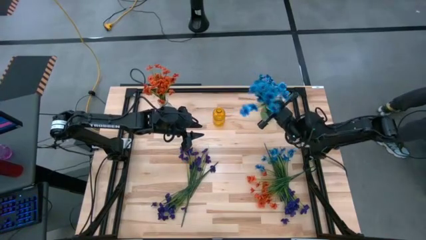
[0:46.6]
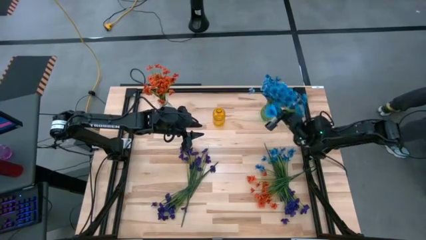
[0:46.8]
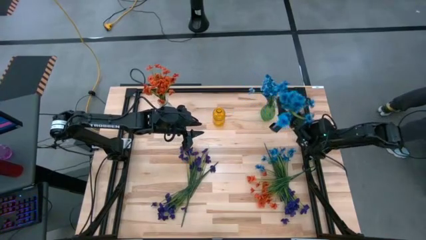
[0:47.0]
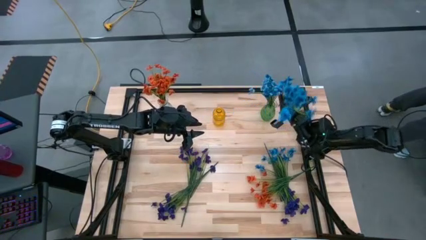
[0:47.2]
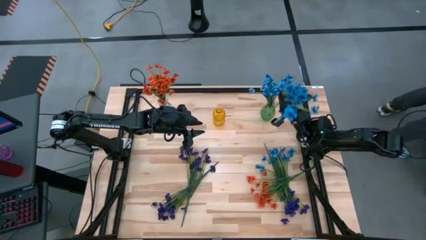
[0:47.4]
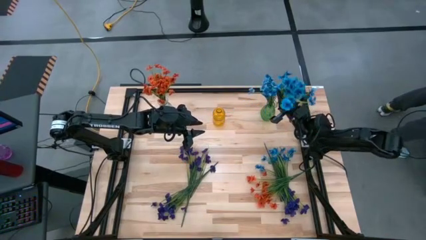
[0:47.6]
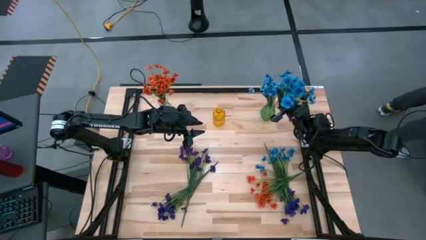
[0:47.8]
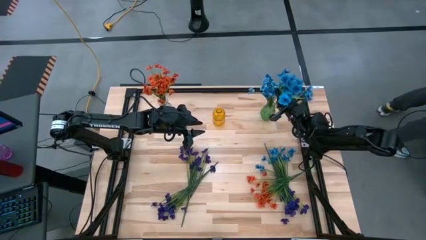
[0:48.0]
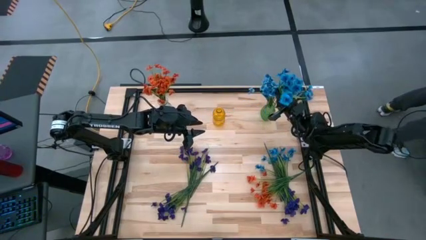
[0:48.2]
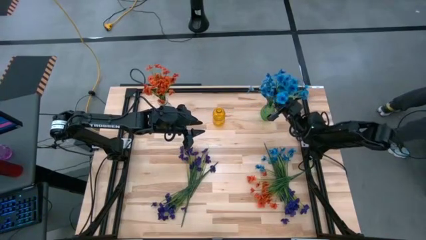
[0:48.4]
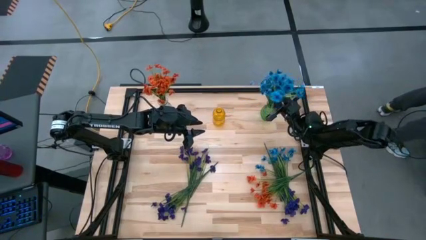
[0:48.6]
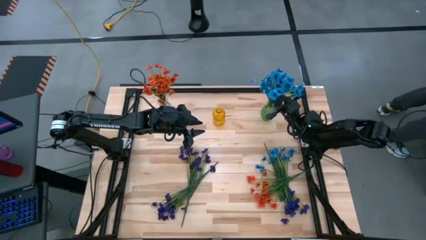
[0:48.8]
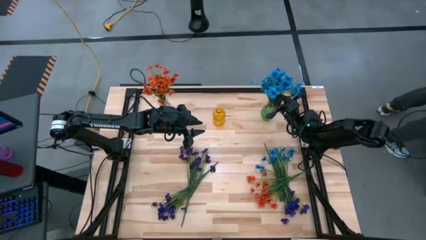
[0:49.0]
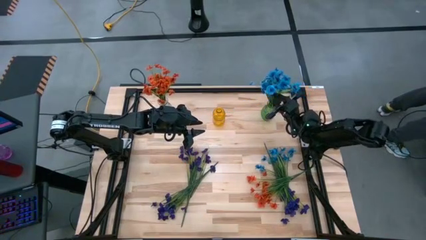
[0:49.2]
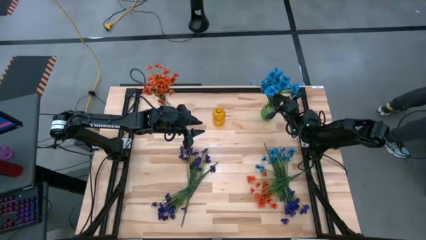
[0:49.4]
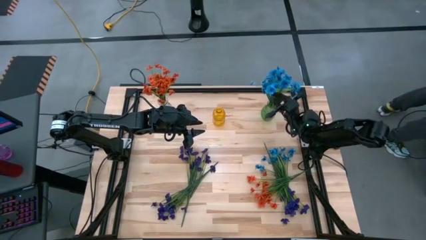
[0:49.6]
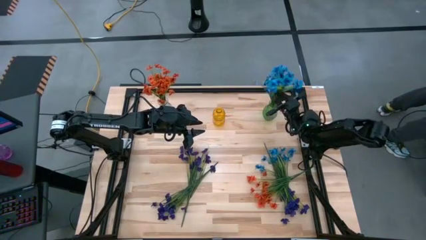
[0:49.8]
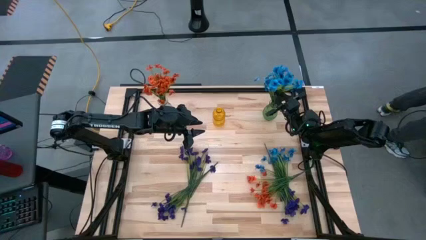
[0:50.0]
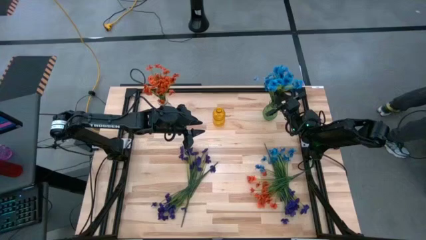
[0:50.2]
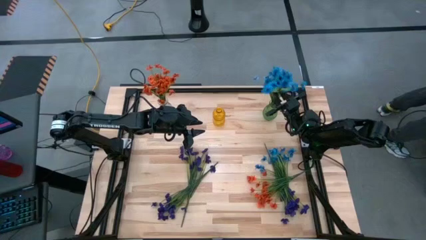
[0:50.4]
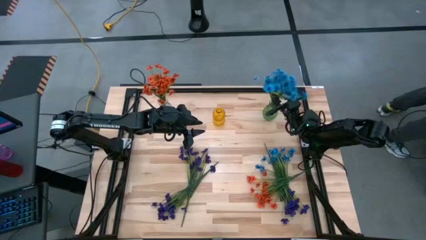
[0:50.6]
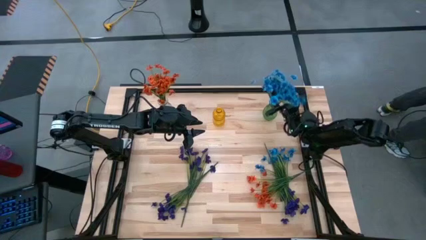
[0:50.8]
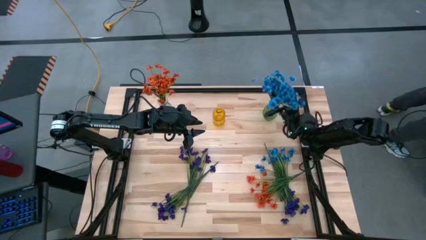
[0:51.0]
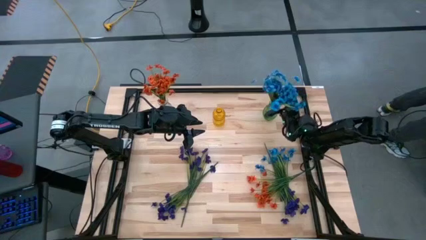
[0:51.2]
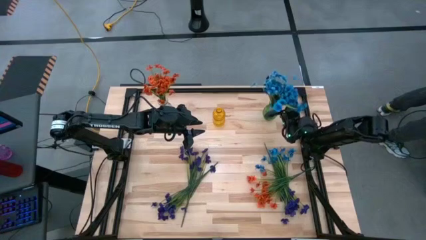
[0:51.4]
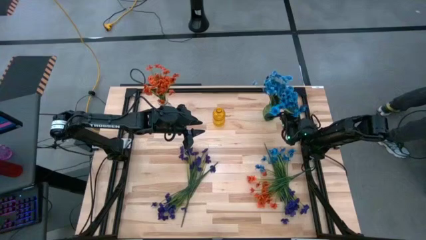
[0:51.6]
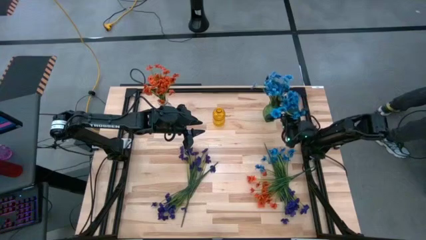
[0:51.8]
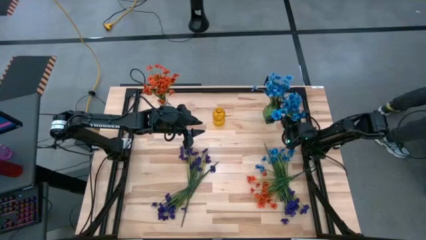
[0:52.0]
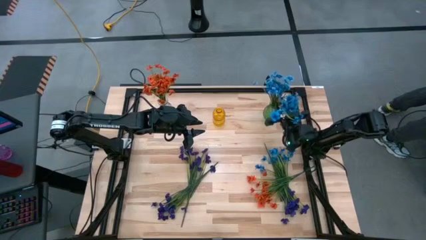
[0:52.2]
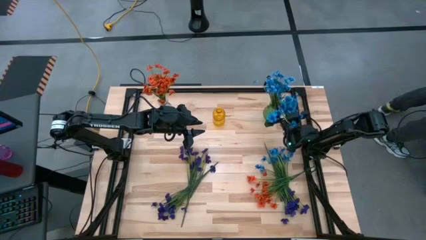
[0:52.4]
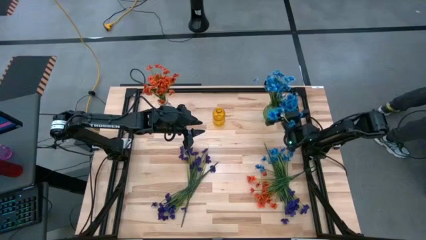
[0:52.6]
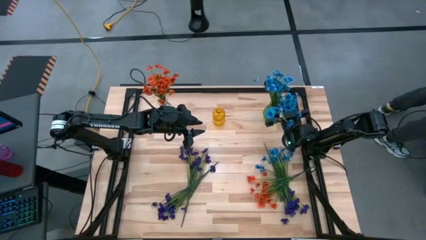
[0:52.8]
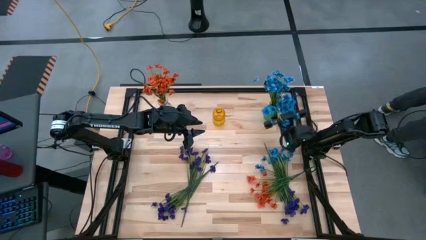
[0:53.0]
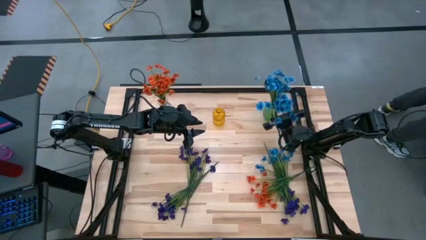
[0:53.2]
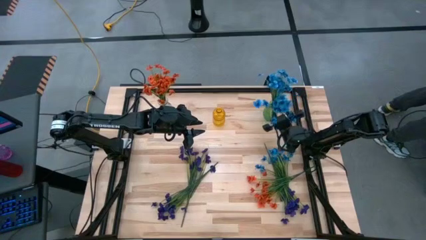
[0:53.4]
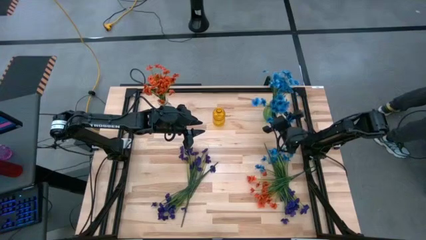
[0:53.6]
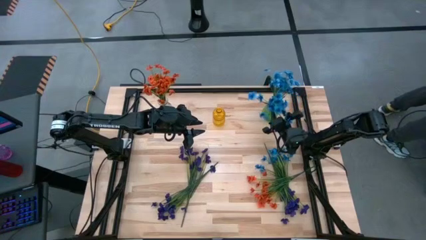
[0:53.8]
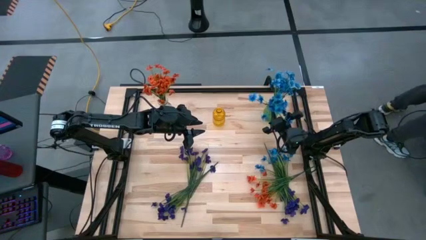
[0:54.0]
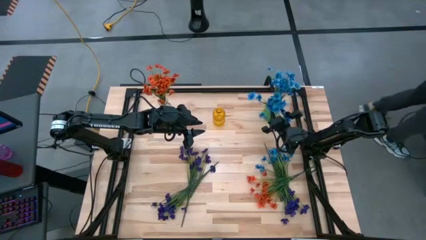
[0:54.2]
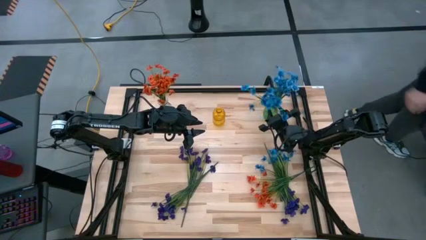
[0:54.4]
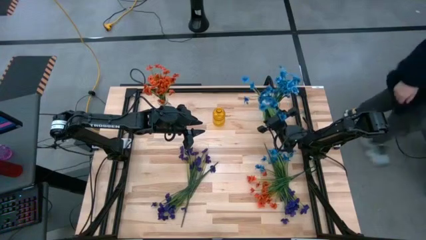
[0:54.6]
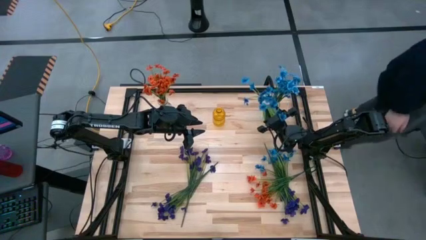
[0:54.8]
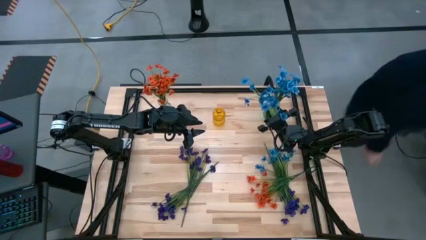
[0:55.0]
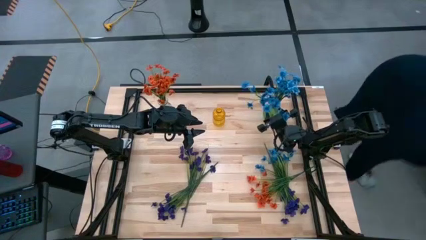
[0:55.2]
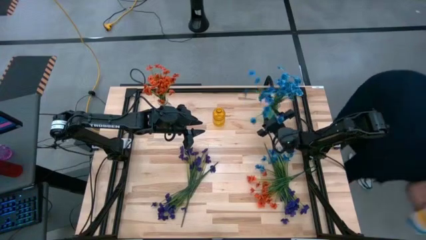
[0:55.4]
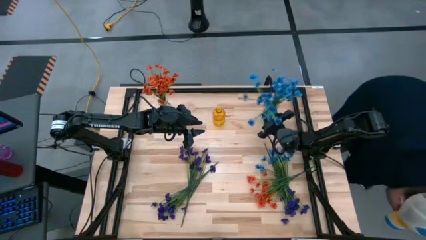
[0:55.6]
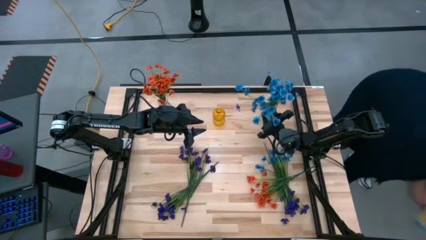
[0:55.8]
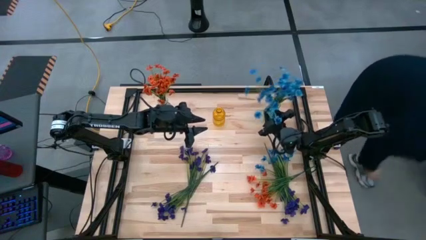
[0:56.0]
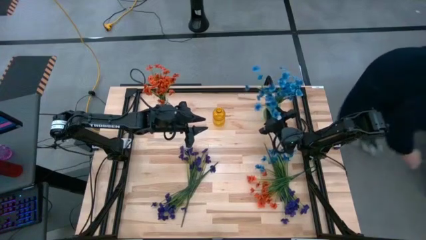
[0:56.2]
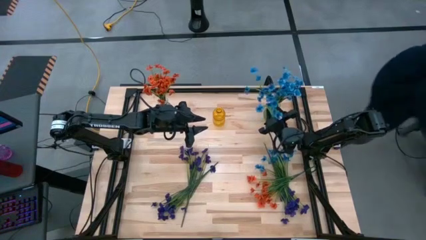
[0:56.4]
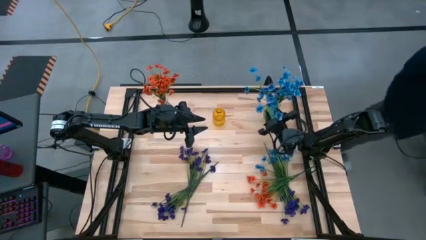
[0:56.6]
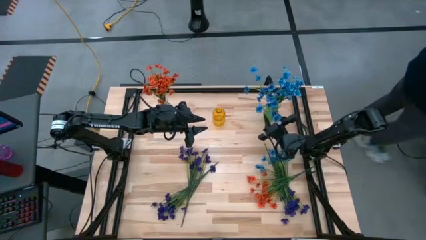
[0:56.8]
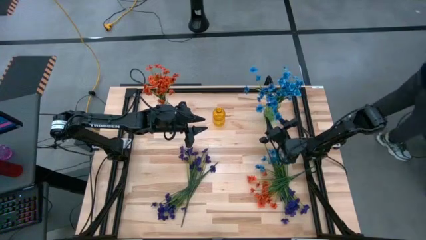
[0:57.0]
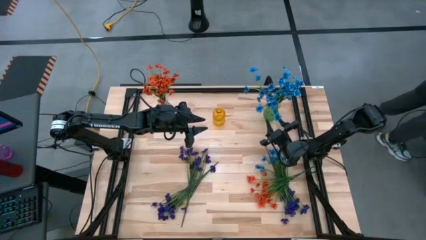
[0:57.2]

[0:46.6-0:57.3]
Task: Sort flowers into vase by color
Put the left blue flower into the green vase
